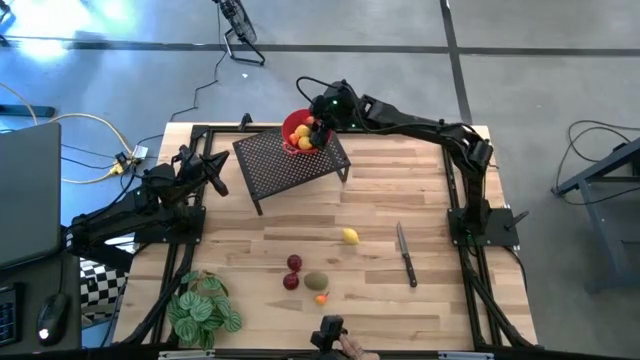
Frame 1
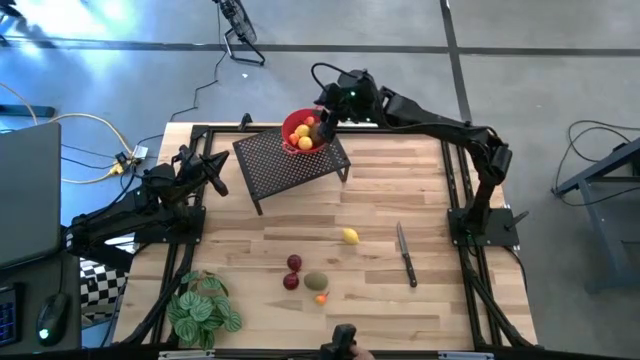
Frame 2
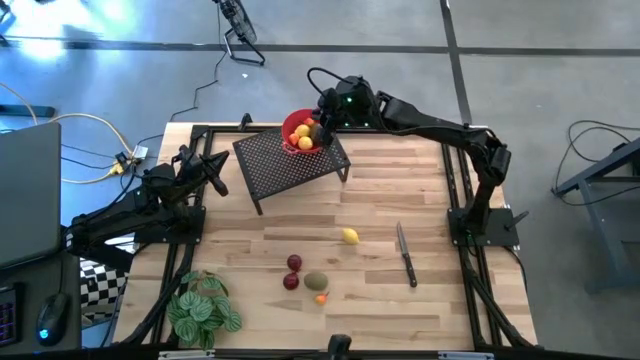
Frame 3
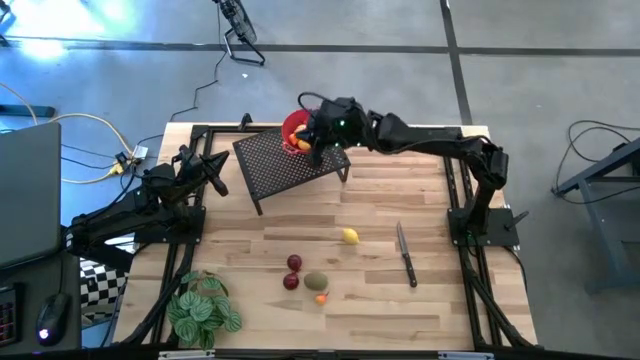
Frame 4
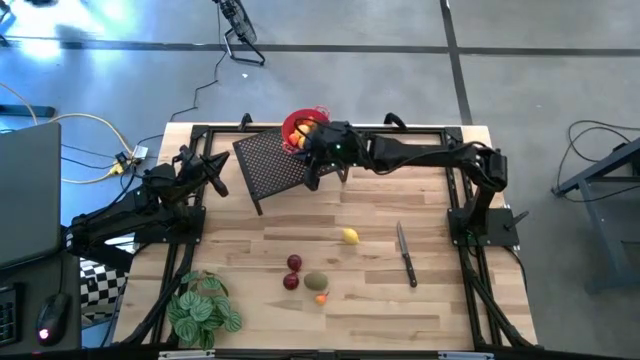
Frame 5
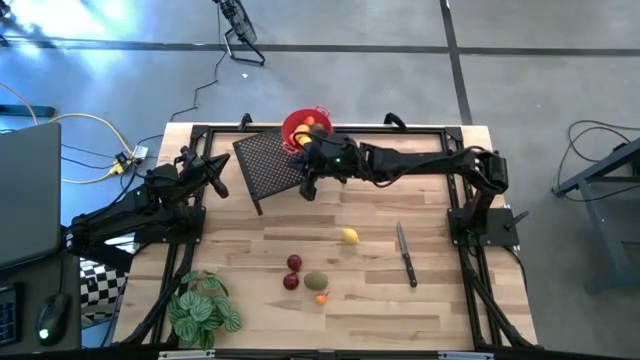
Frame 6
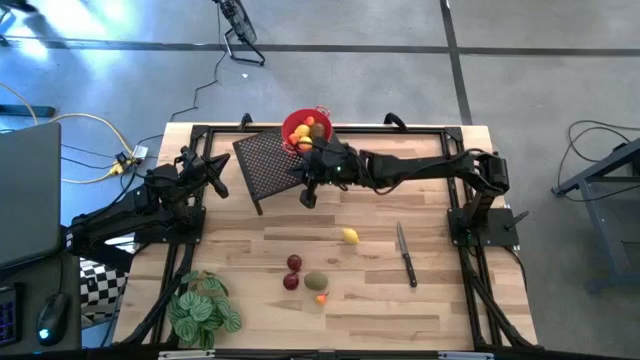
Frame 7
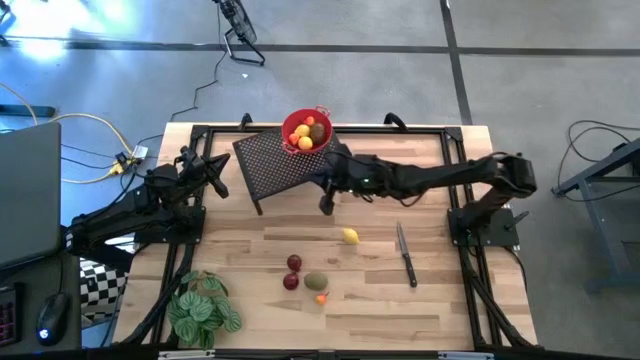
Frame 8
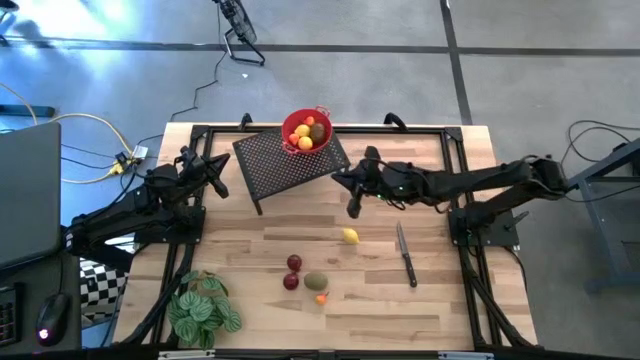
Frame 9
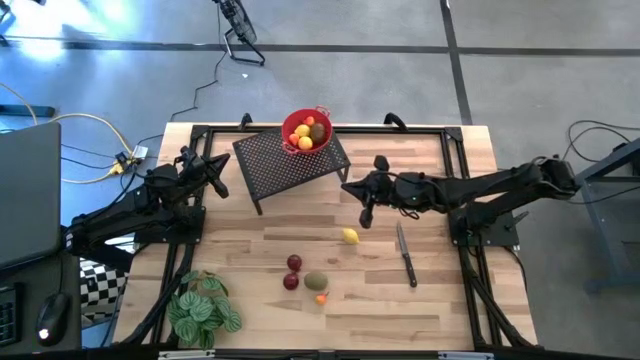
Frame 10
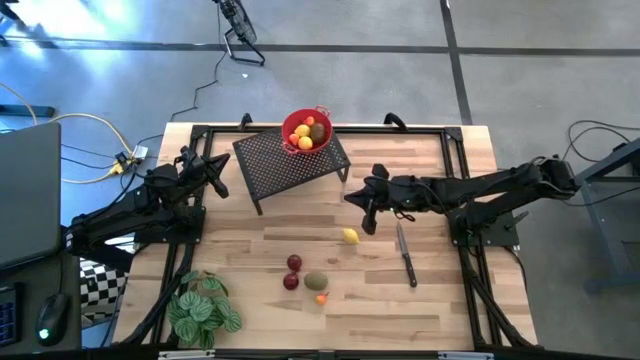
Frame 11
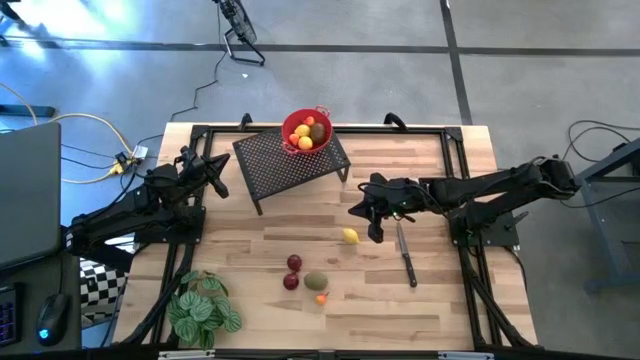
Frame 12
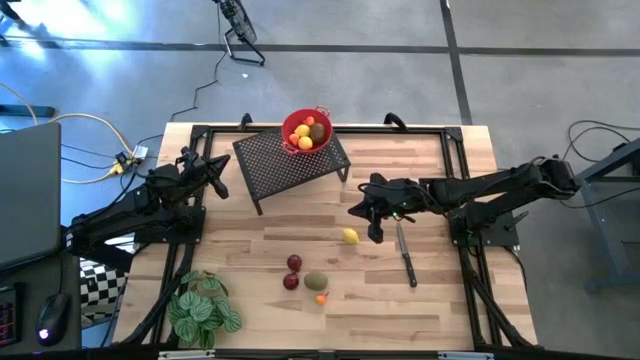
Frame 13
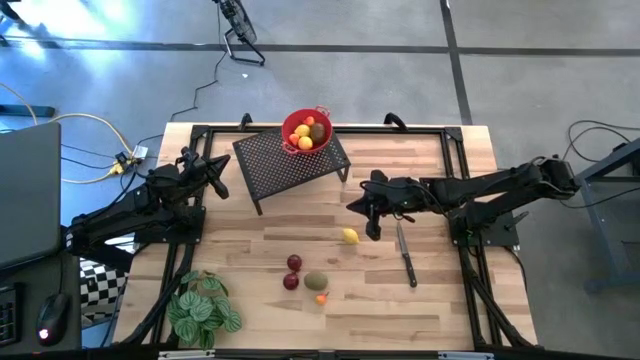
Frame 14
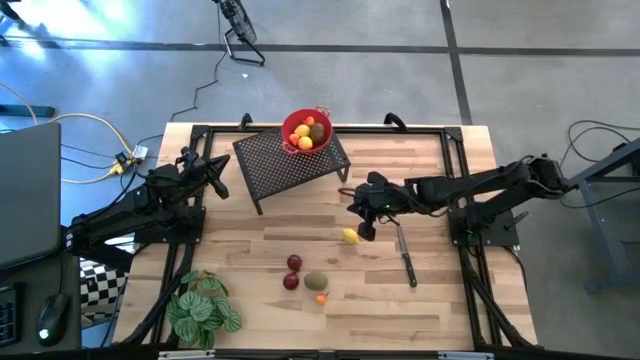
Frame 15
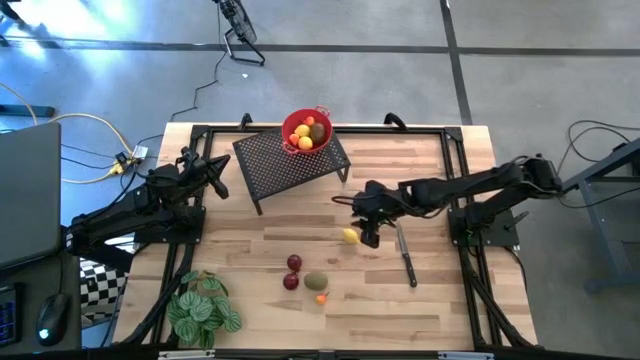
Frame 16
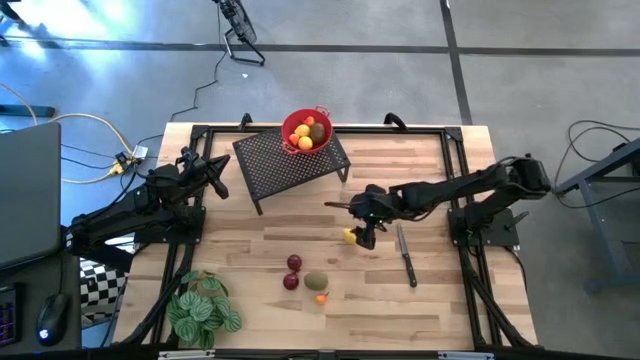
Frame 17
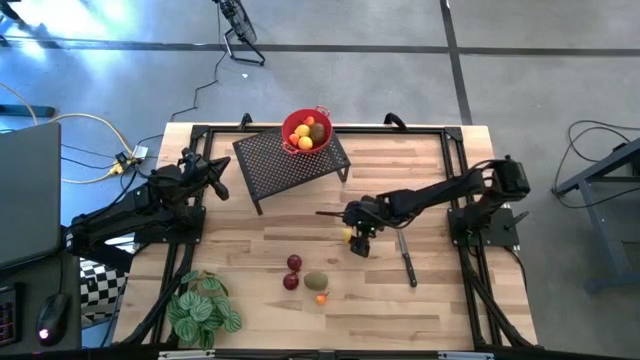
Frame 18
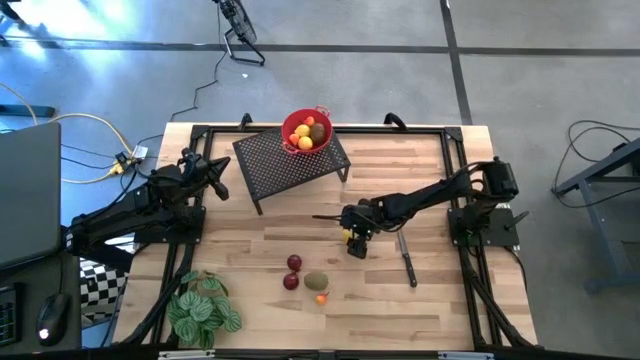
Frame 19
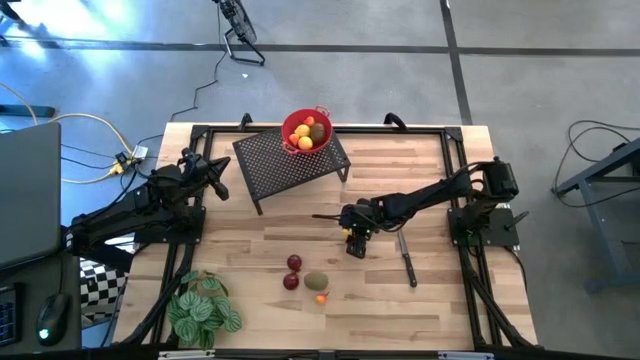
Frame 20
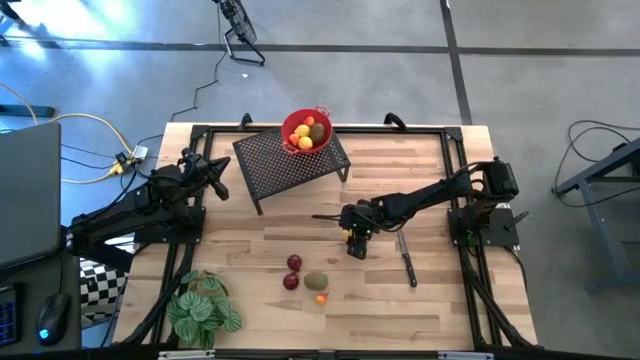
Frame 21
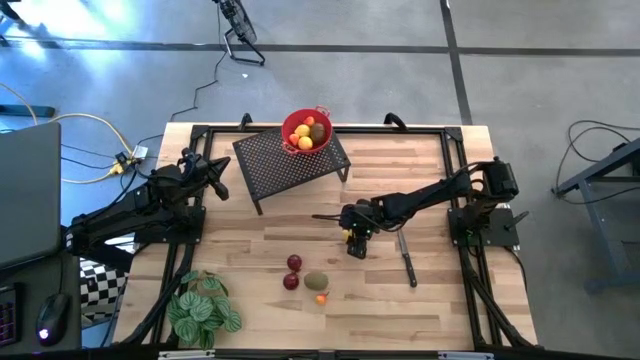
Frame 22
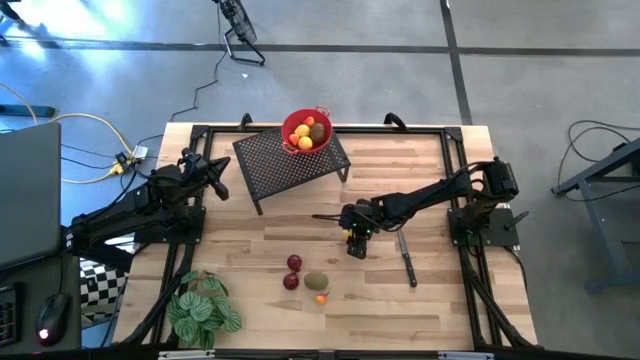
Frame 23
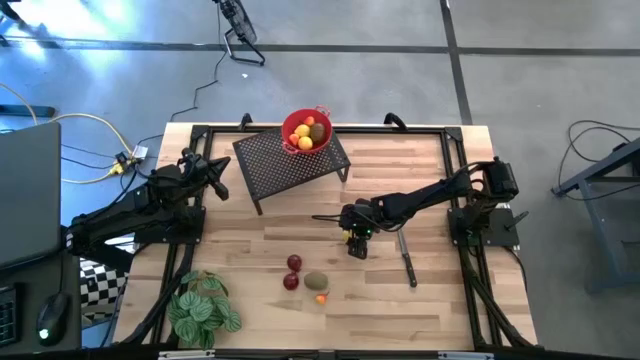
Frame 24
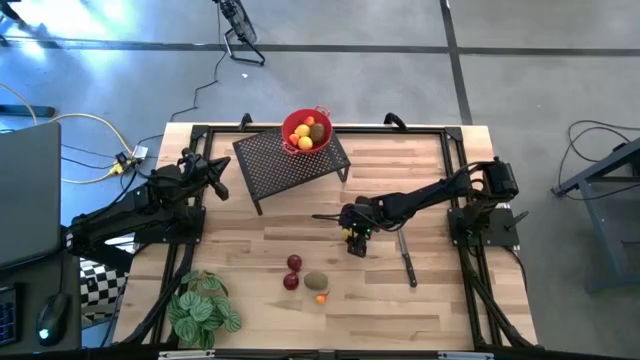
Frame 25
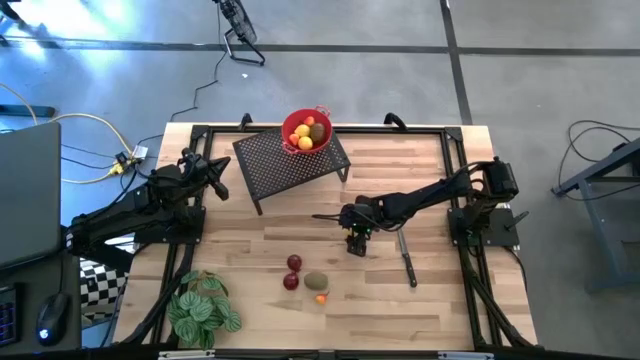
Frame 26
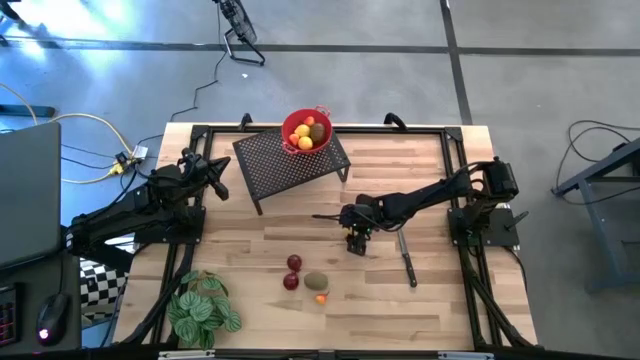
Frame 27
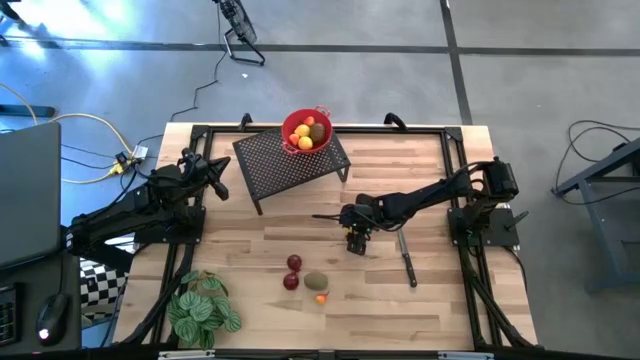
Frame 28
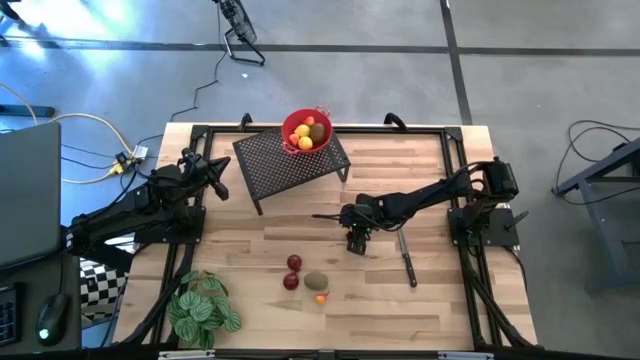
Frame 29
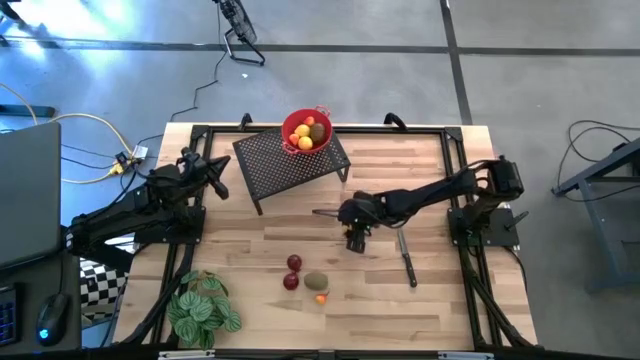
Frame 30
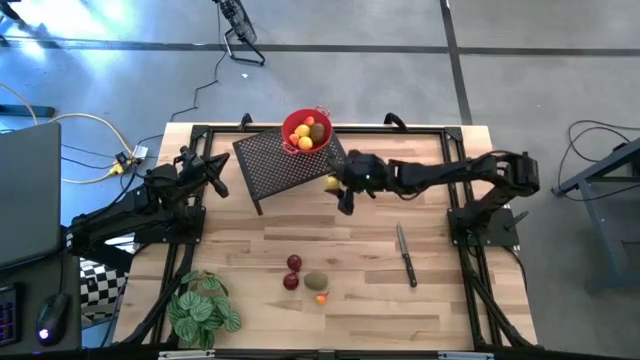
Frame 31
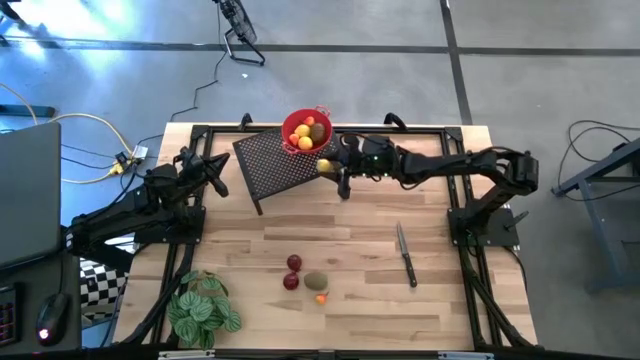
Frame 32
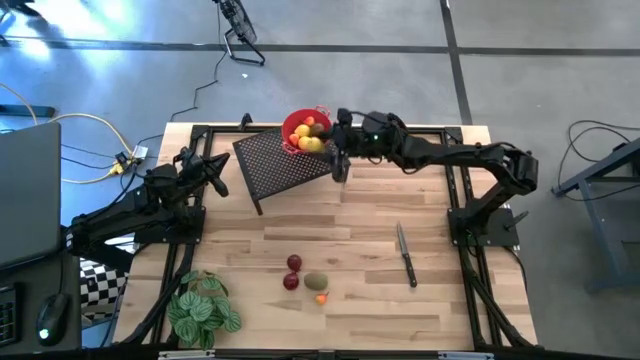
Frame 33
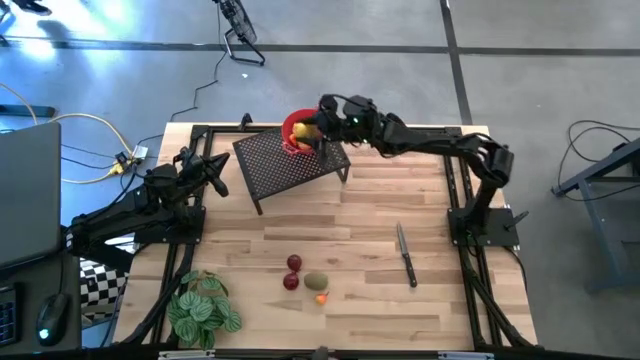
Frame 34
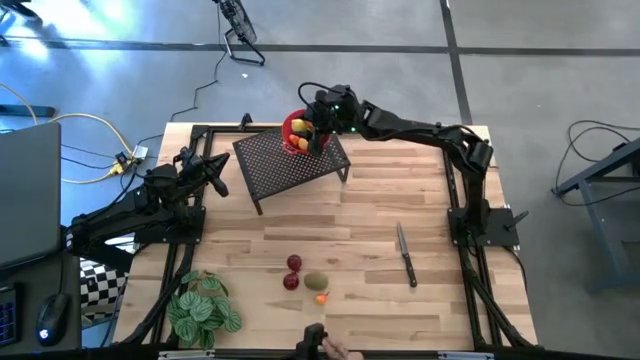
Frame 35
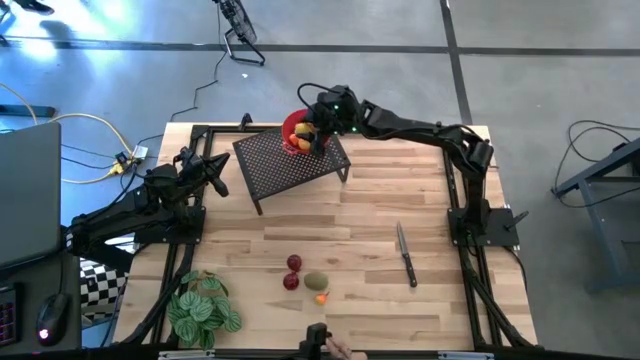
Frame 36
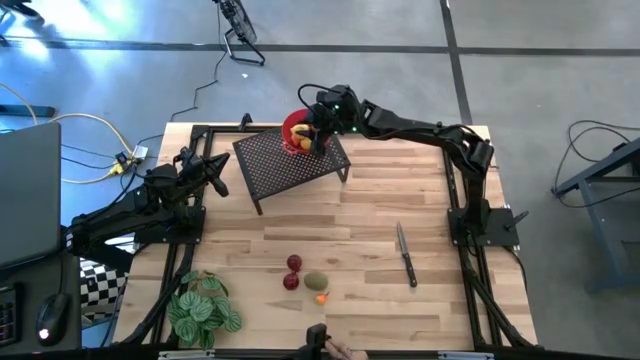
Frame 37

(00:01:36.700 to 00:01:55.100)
Task: Pick & Place Fruit
Put the lemon into the red strainer bowl on the shelf

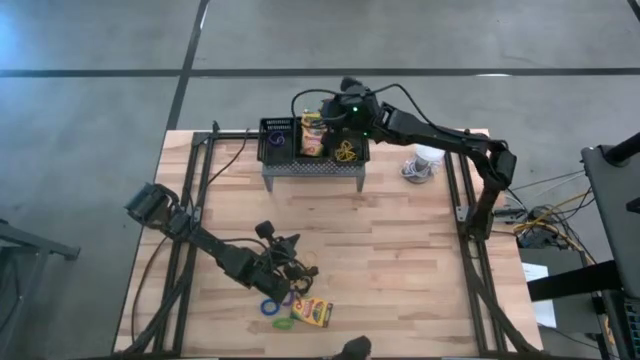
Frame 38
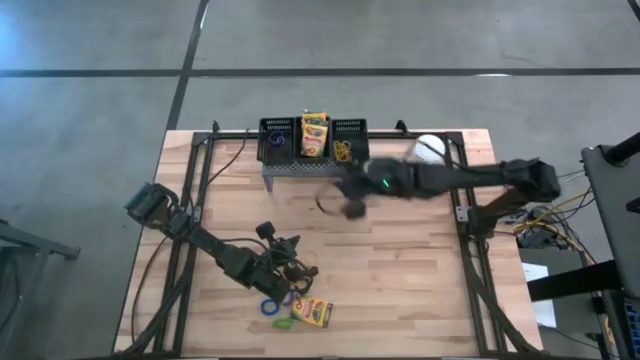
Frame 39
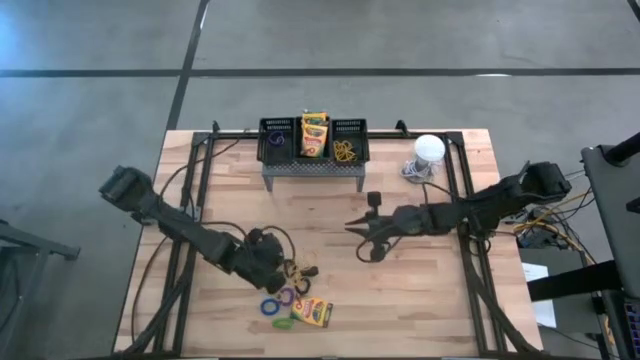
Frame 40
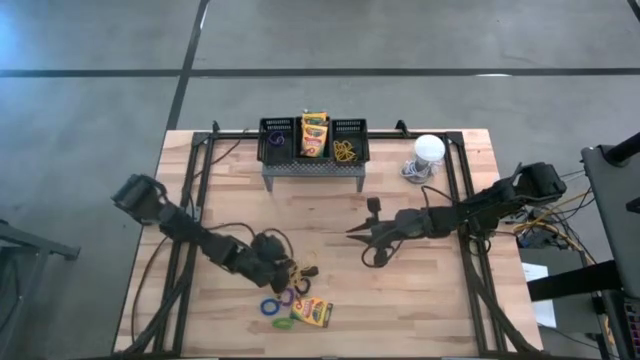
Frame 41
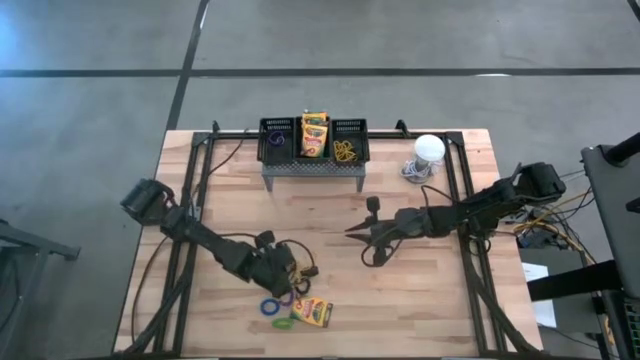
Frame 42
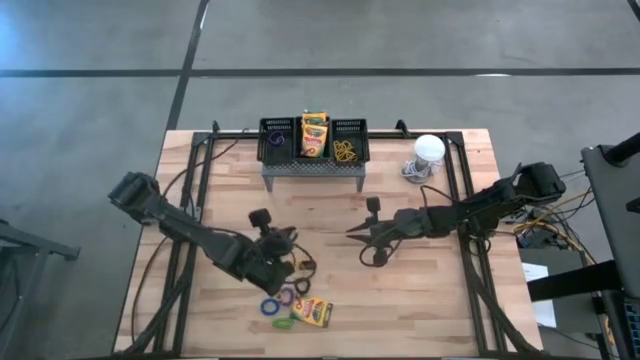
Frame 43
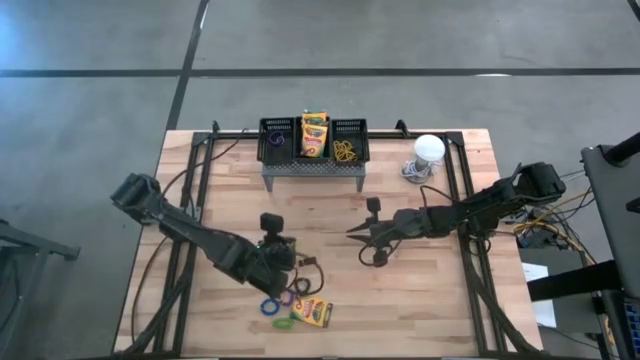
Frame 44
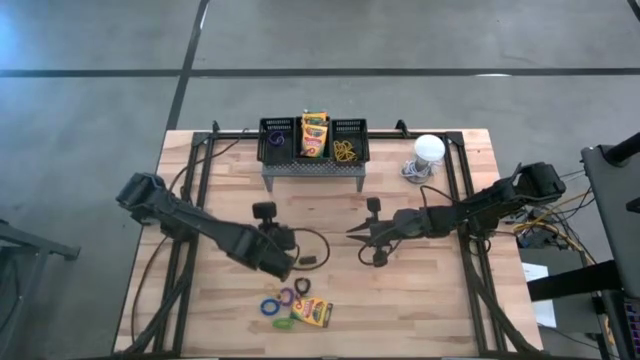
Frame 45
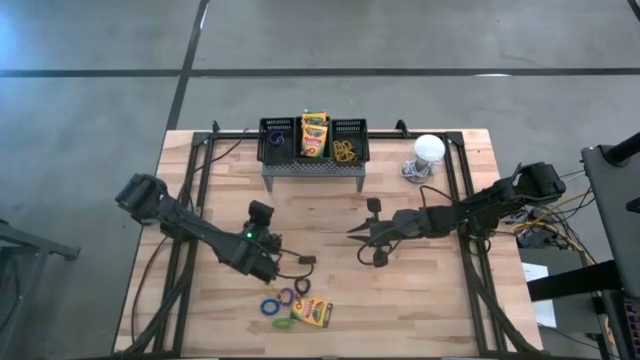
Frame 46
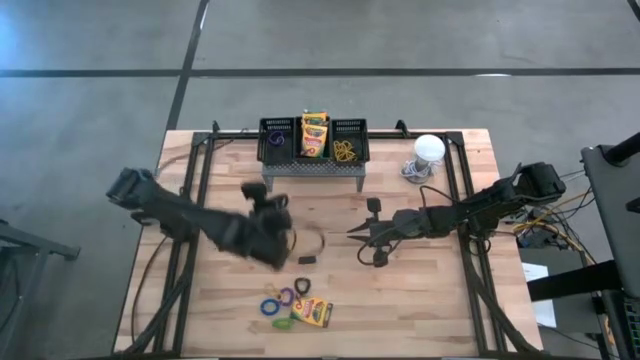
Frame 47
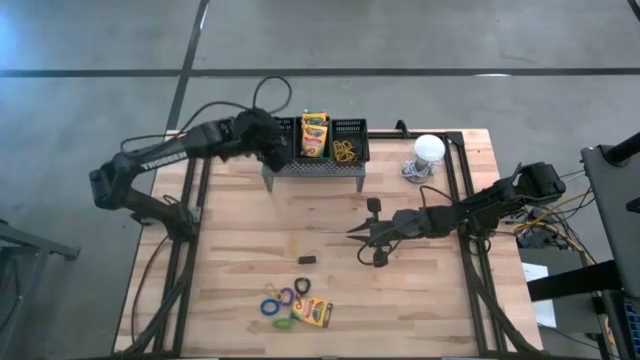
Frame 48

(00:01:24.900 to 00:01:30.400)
Task: Pick & Place Office Desk Supplies
Put the black spring keychain into the left black basket on the shelf
